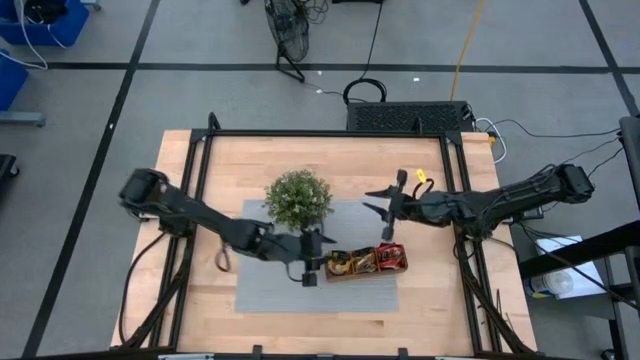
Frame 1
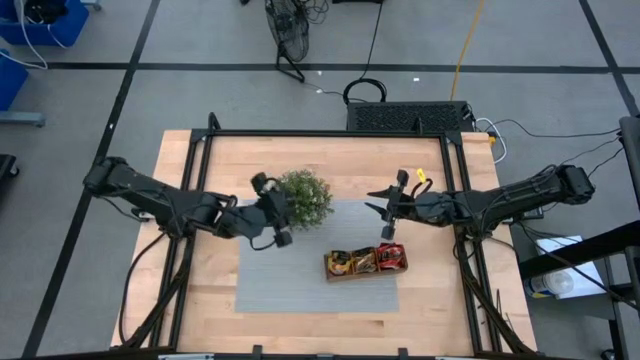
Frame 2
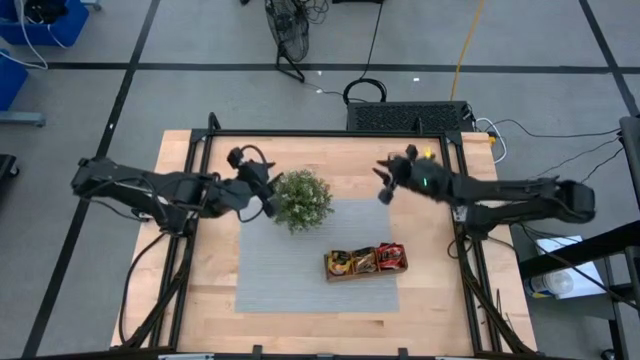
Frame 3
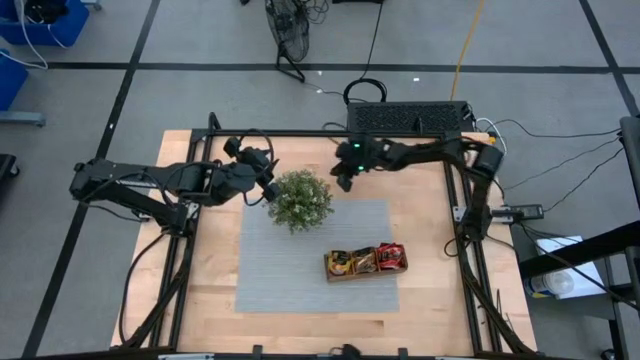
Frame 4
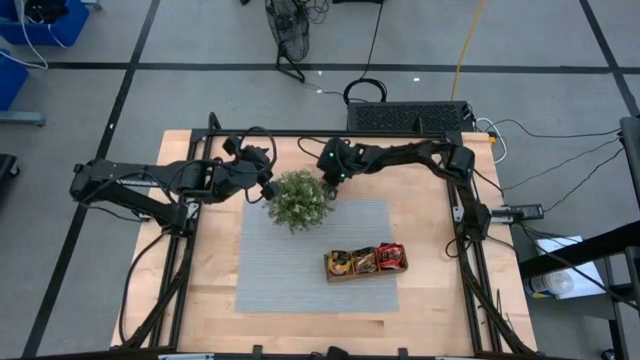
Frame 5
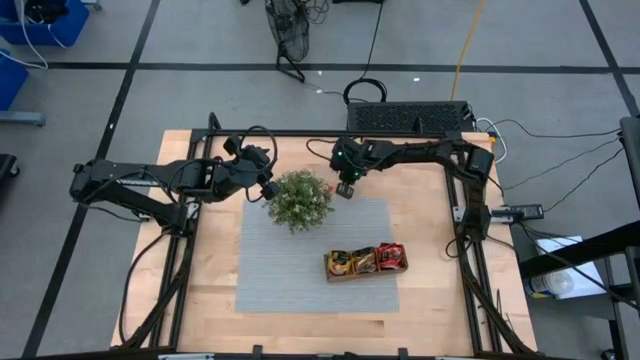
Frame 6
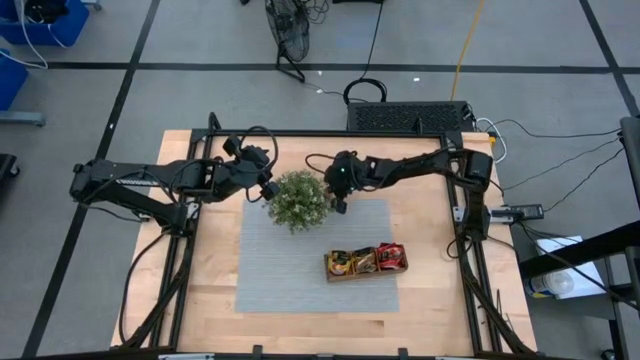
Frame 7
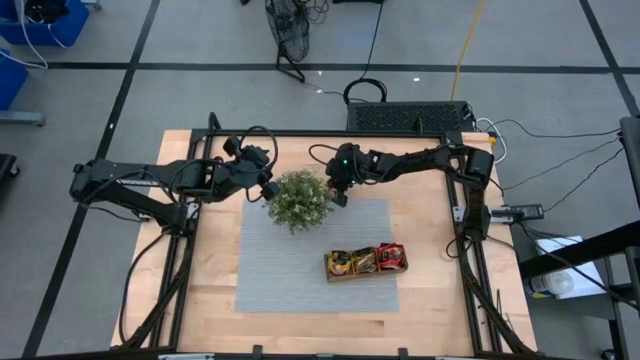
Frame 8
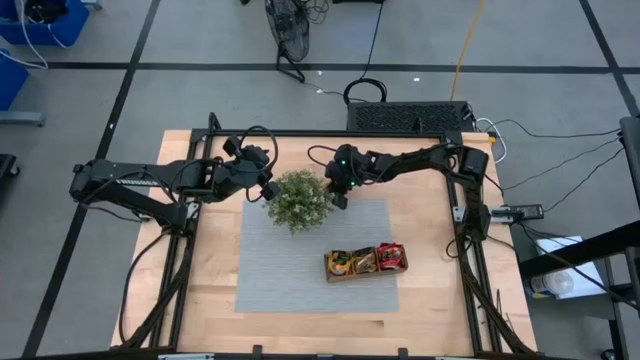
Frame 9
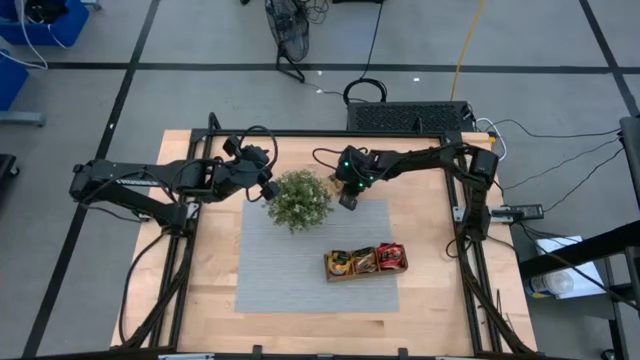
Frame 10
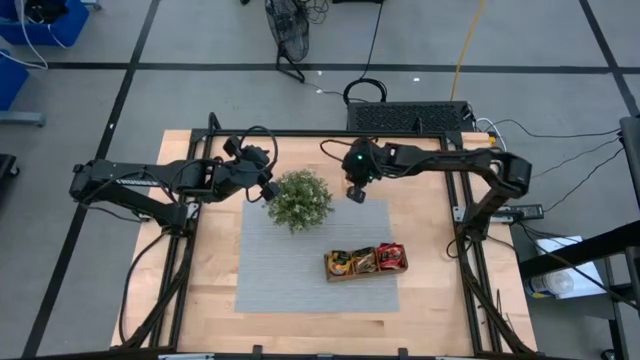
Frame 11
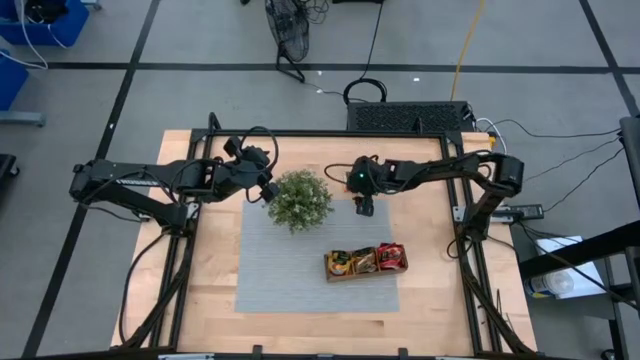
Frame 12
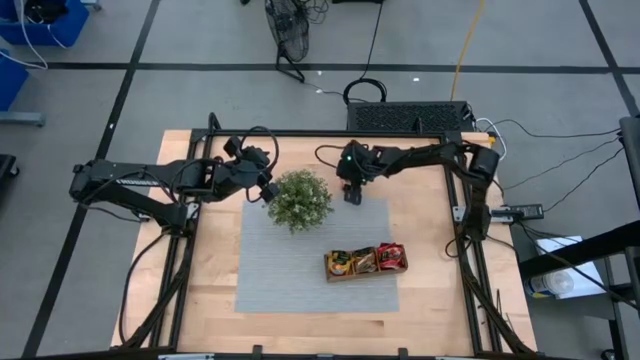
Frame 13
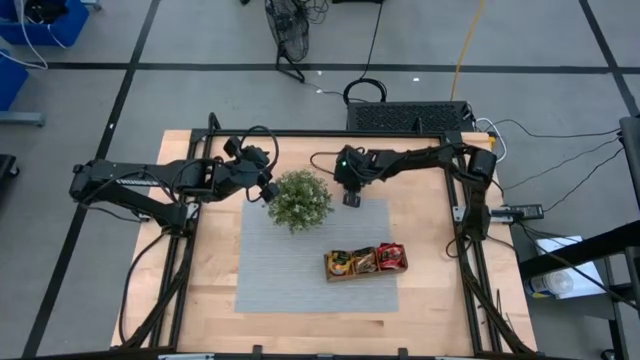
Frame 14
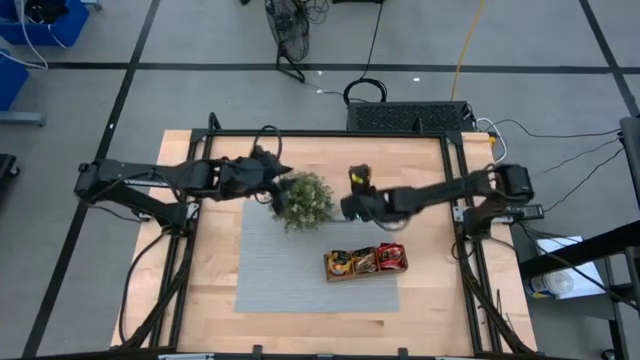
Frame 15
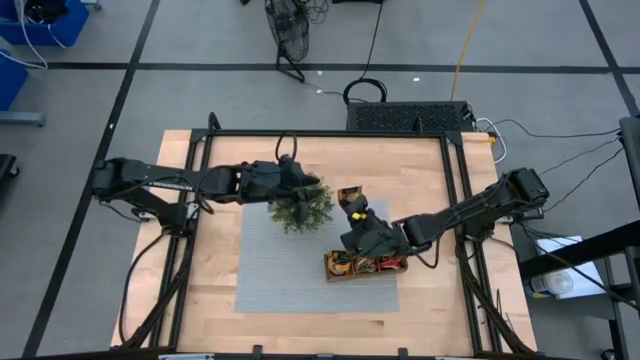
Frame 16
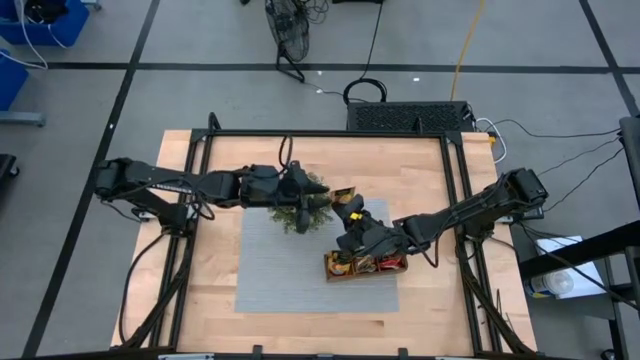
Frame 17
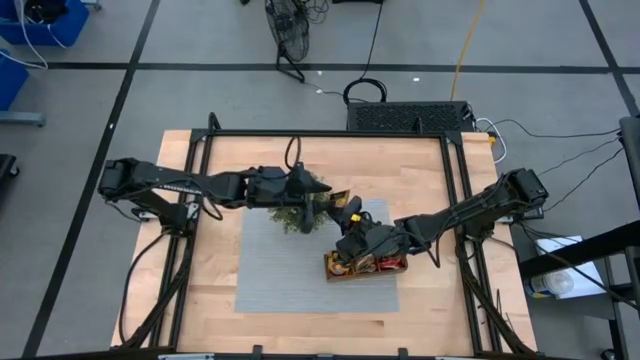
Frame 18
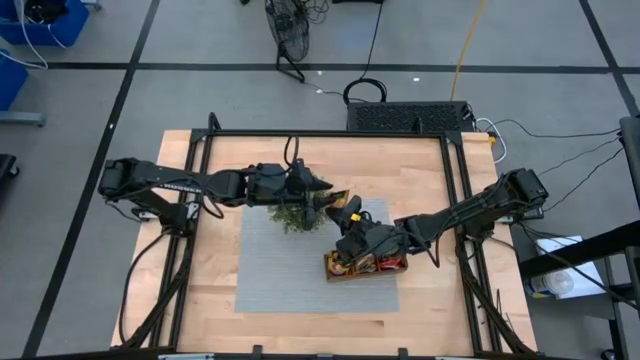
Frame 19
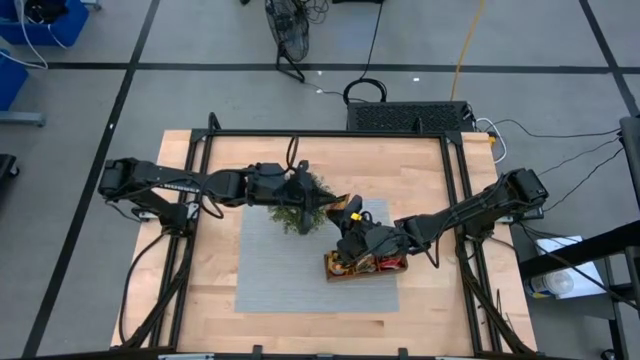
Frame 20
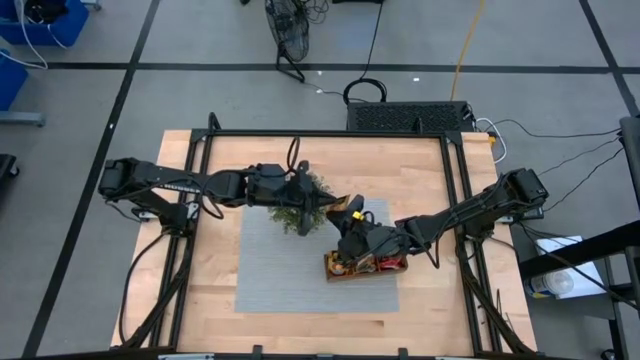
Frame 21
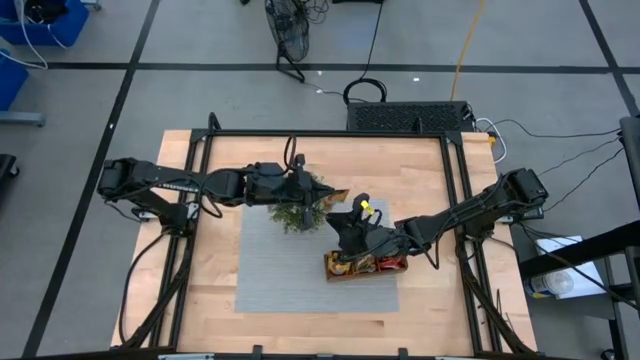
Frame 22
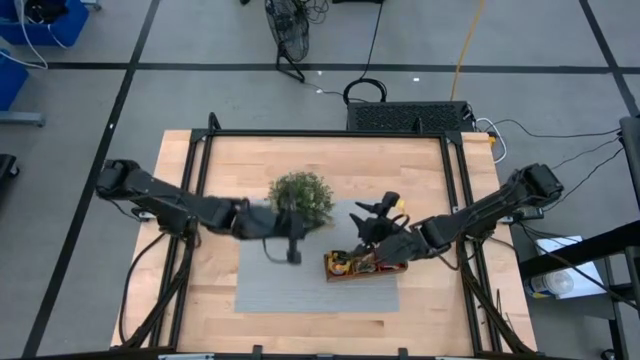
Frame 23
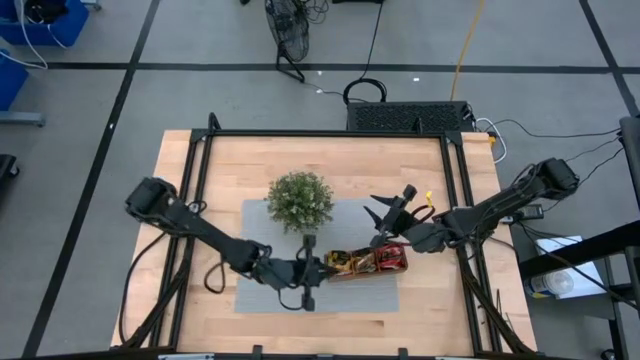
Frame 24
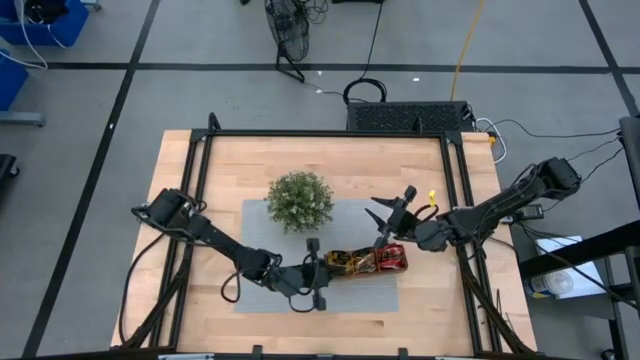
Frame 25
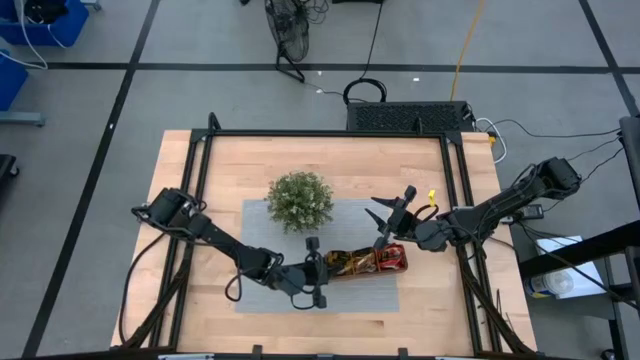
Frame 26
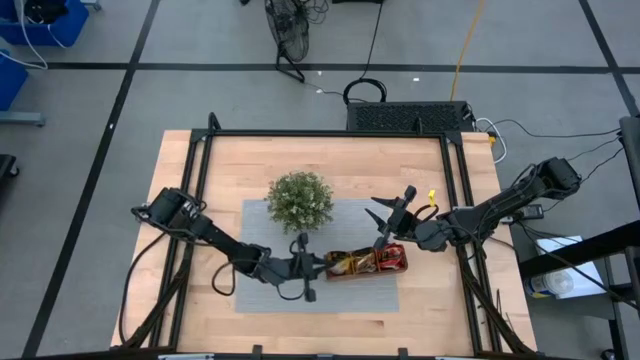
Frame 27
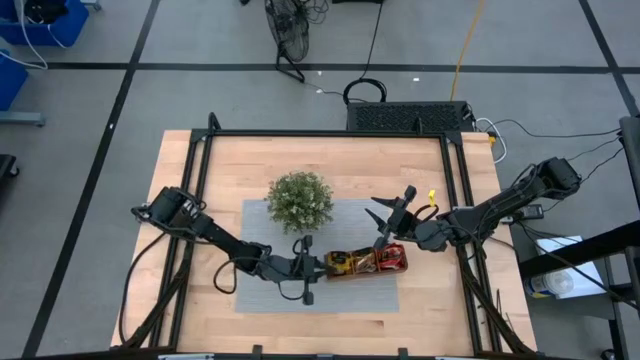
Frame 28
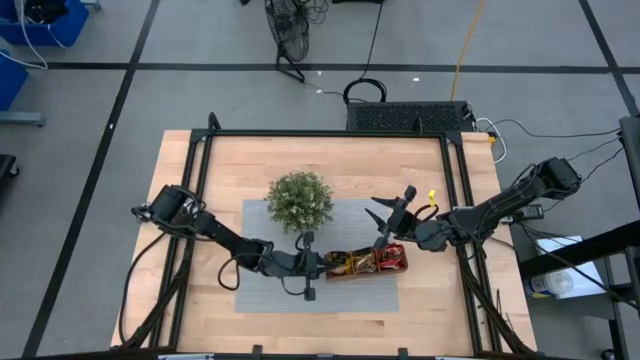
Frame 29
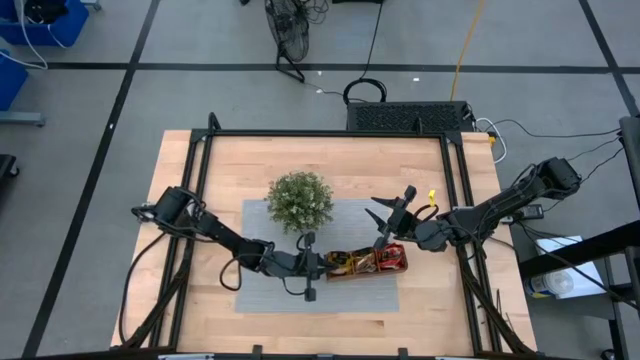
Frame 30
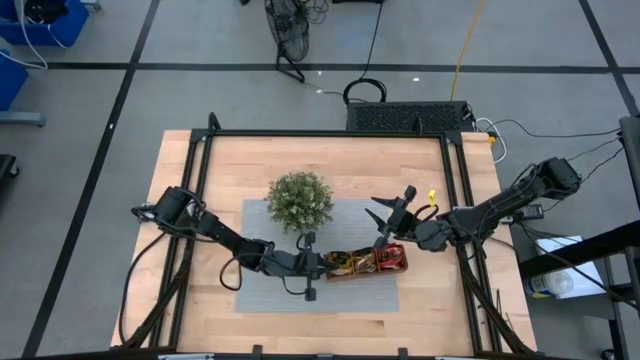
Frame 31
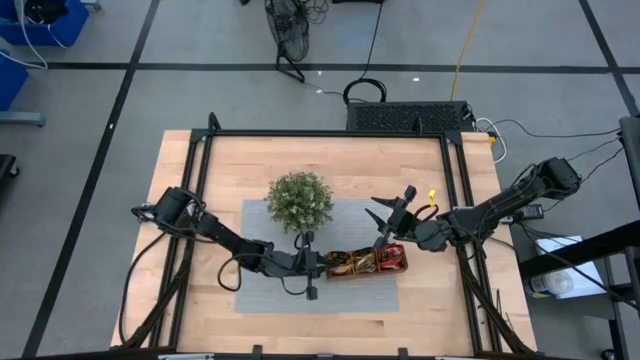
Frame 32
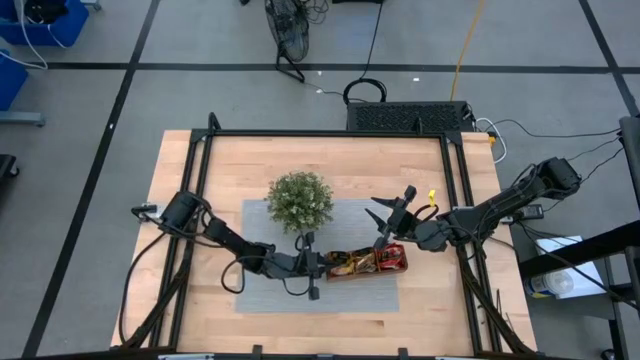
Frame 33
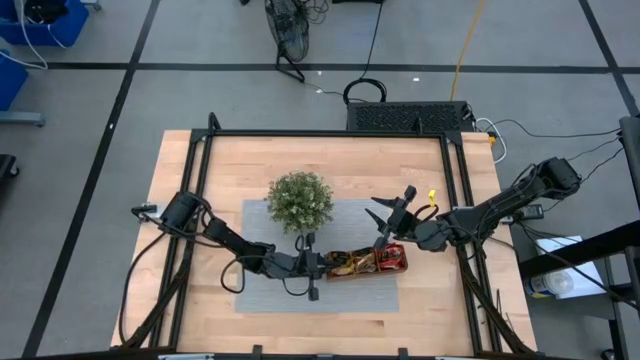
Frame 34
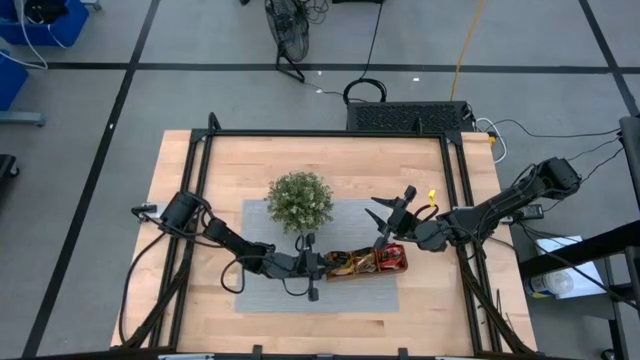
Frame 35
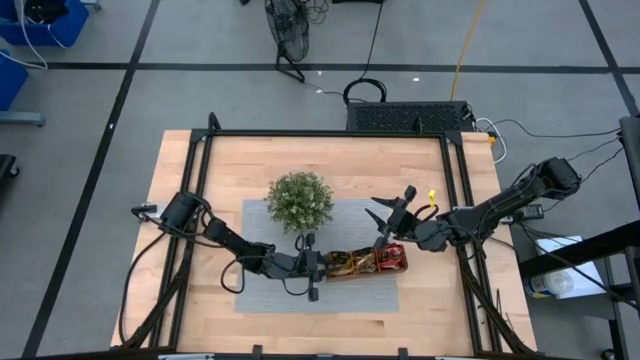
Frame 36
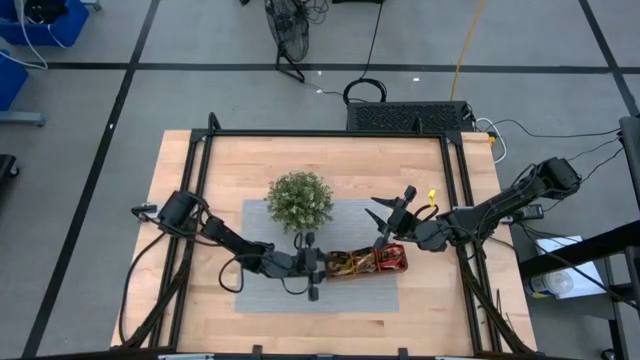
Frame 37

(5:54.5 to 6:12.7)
Task: Pick & Place Tea
Put the mango tea sachet into the brown organizer

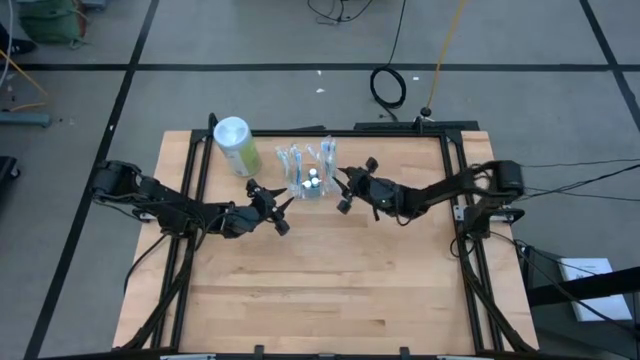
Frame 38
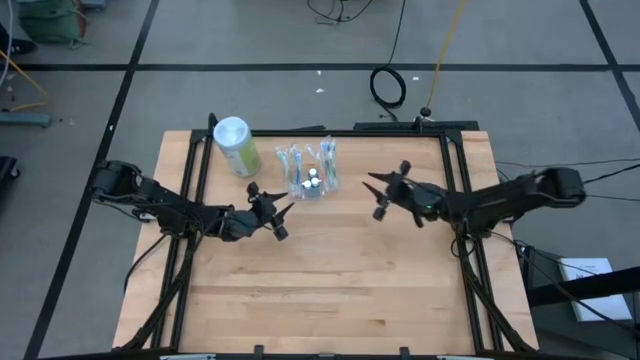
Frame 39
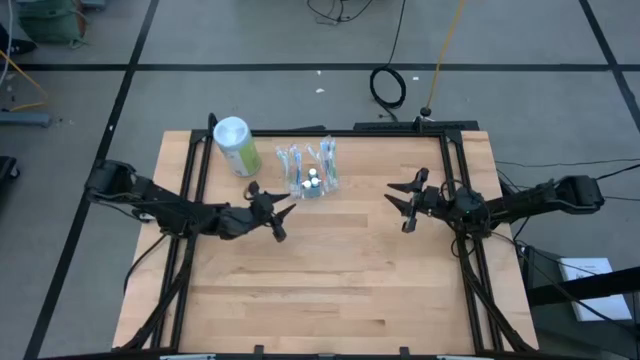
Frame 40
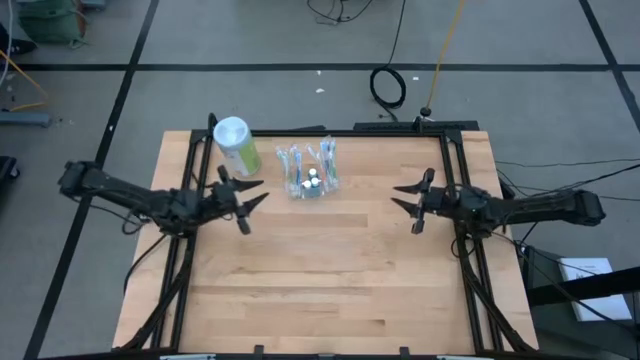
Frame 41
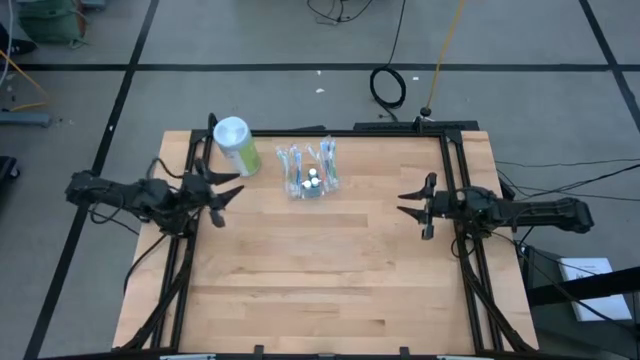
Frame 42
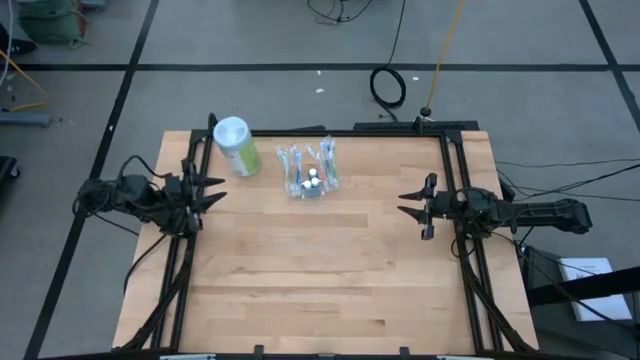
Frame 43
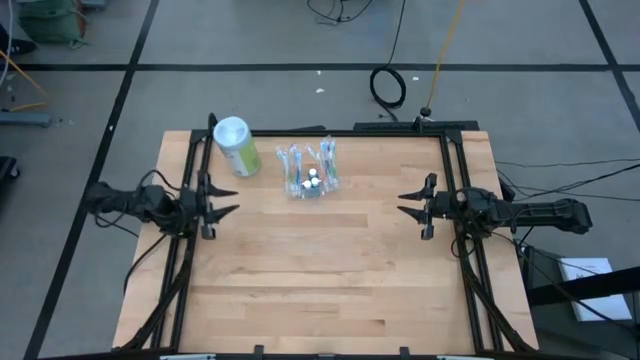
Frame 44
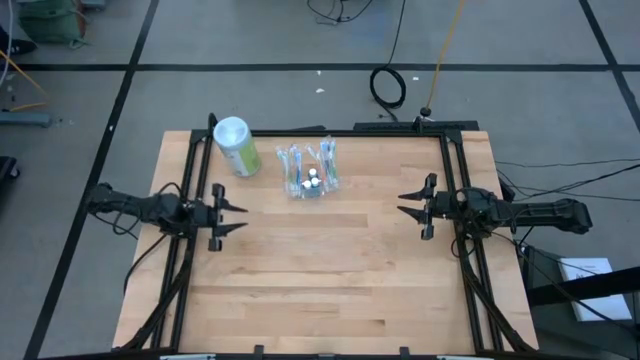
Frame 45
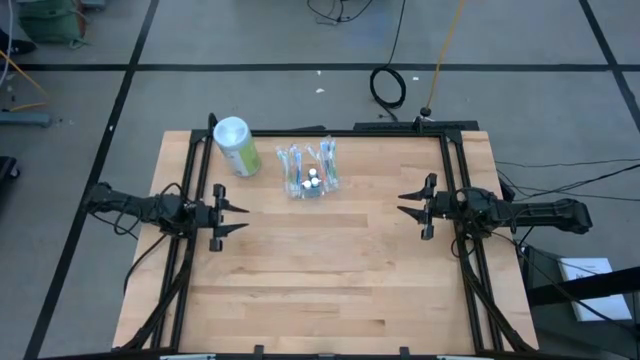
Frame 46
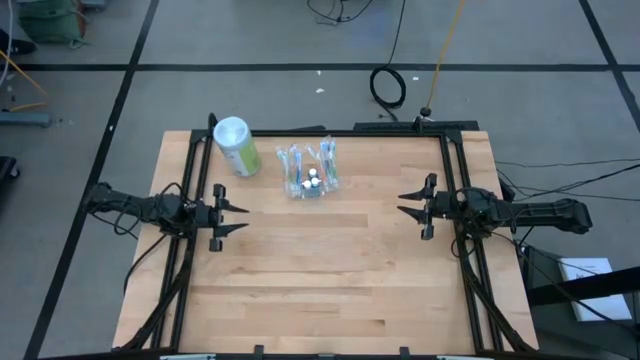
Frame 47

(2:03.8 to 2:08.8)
Task: Pick & Place toothbrushing station
Return to Home Position
